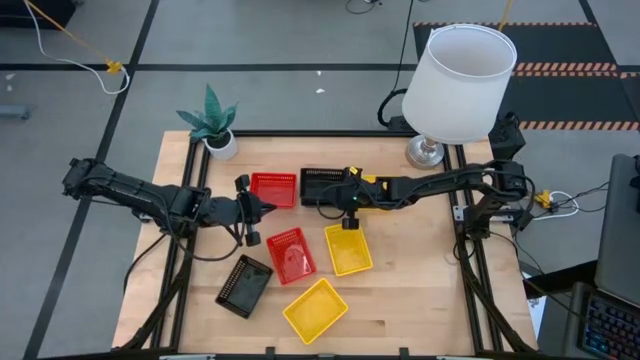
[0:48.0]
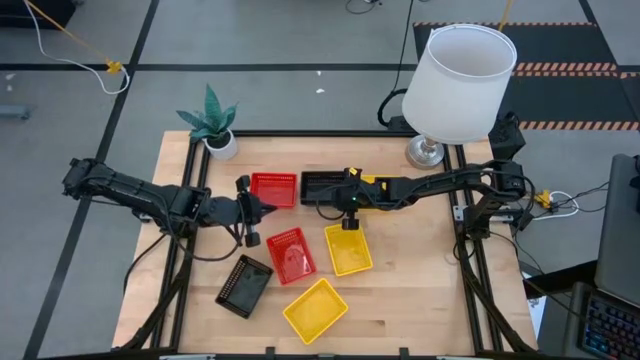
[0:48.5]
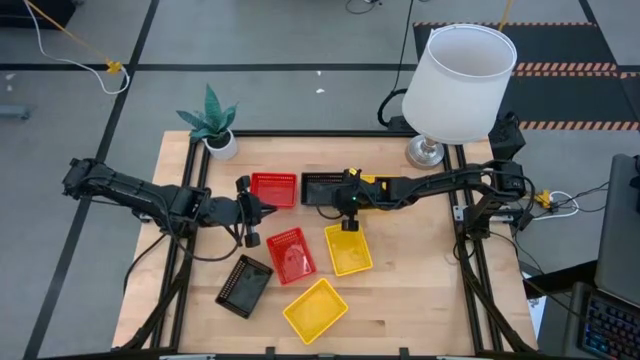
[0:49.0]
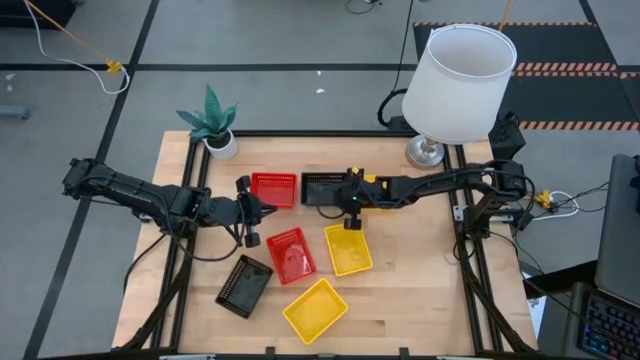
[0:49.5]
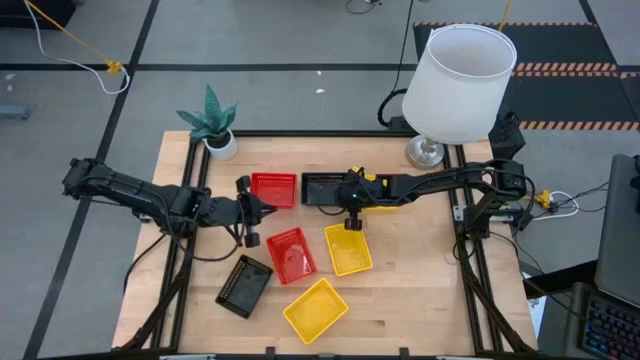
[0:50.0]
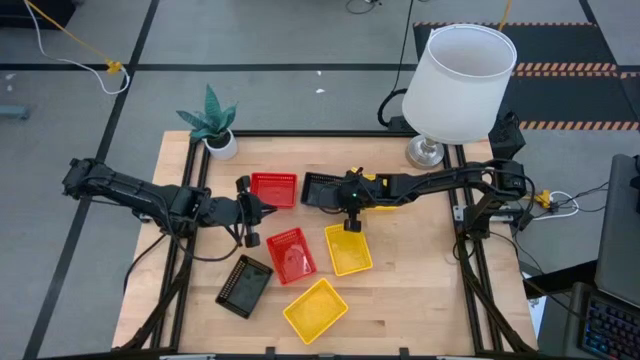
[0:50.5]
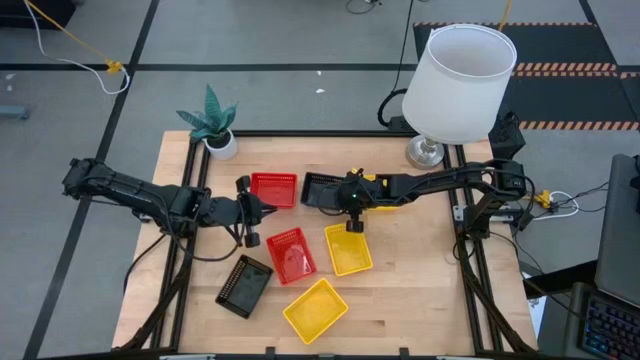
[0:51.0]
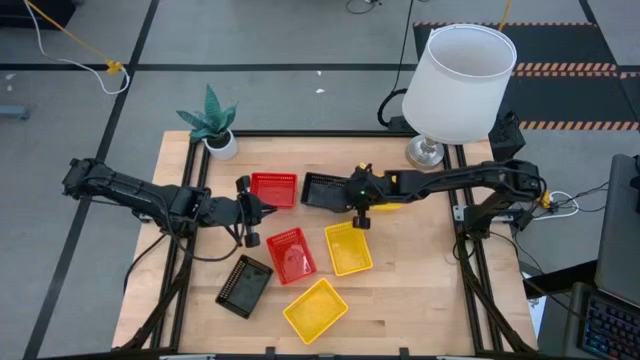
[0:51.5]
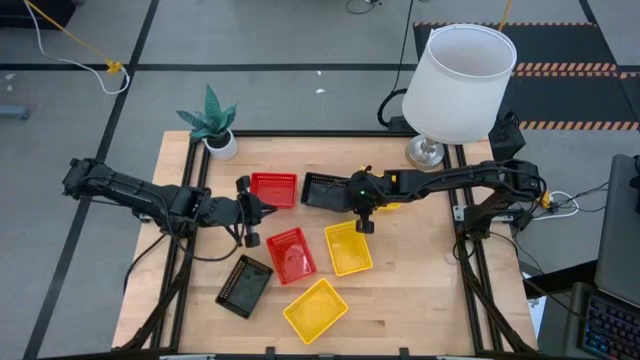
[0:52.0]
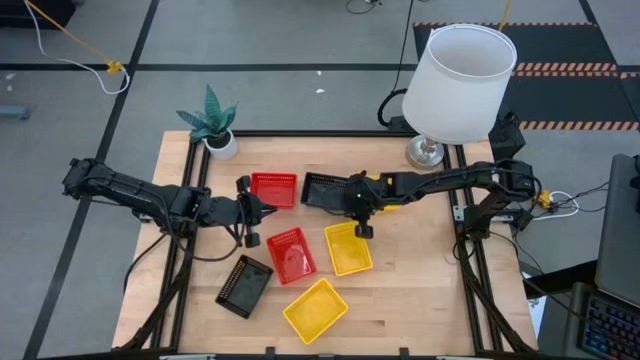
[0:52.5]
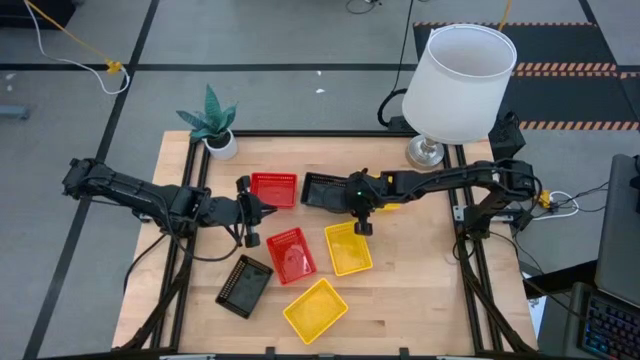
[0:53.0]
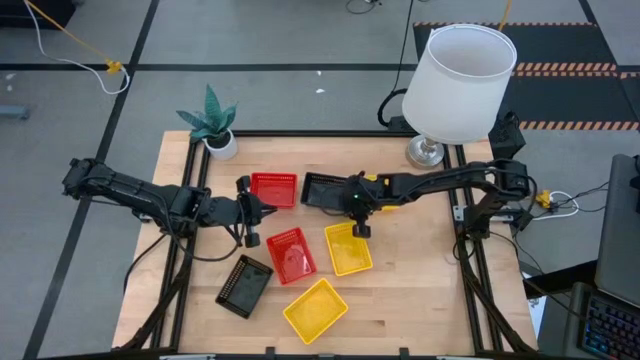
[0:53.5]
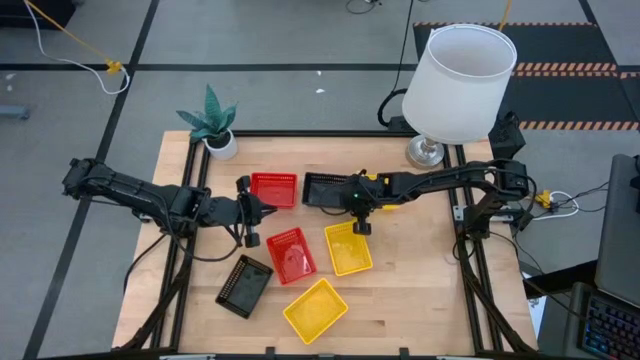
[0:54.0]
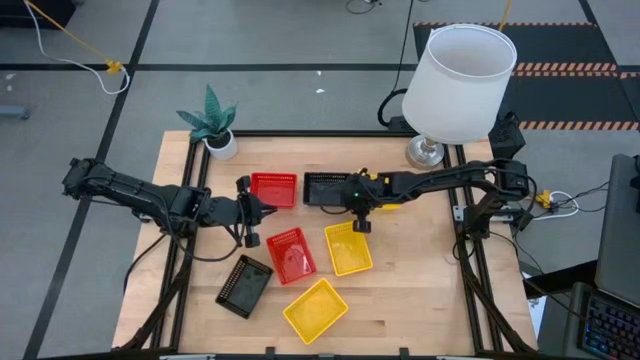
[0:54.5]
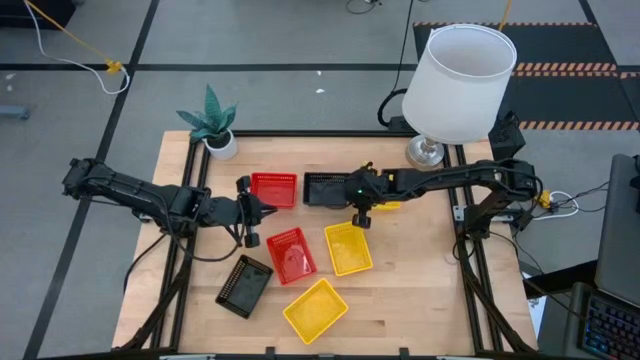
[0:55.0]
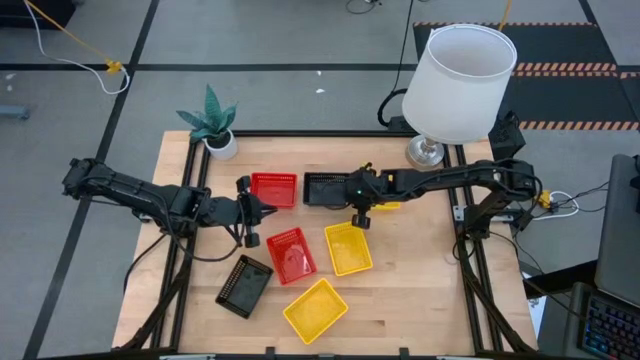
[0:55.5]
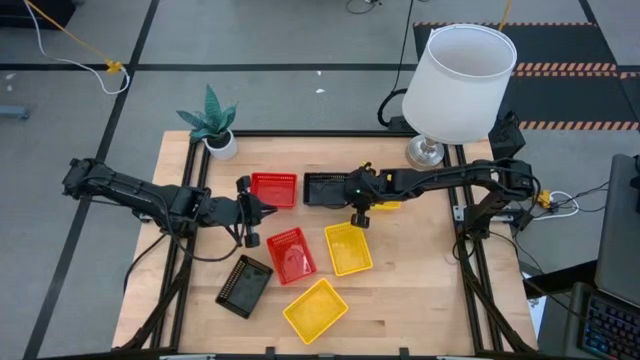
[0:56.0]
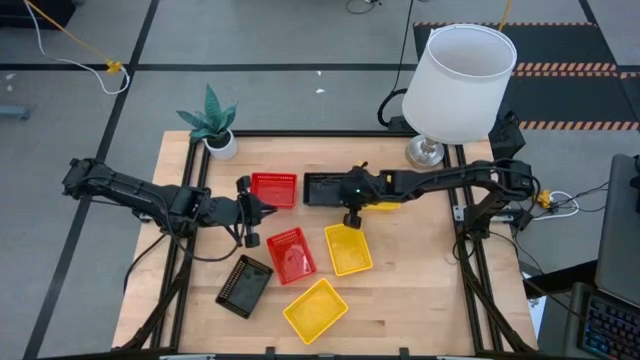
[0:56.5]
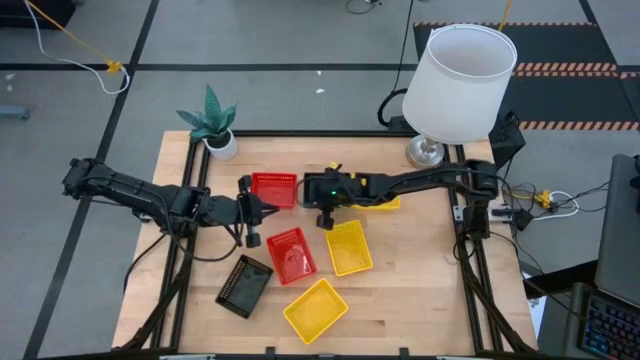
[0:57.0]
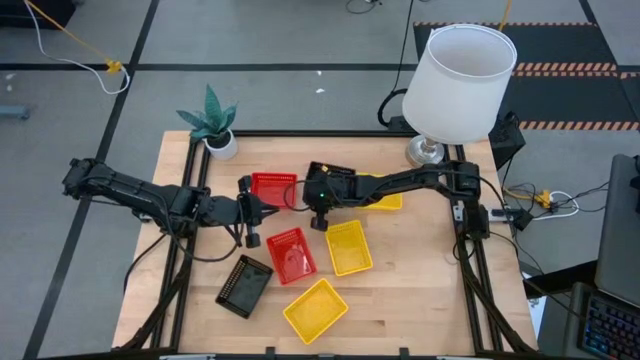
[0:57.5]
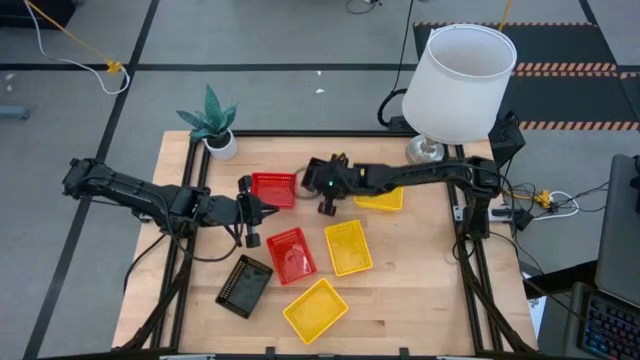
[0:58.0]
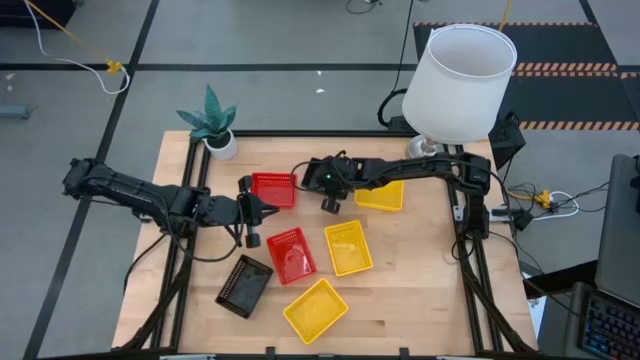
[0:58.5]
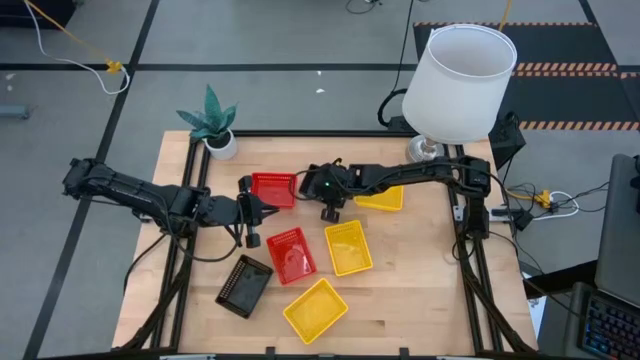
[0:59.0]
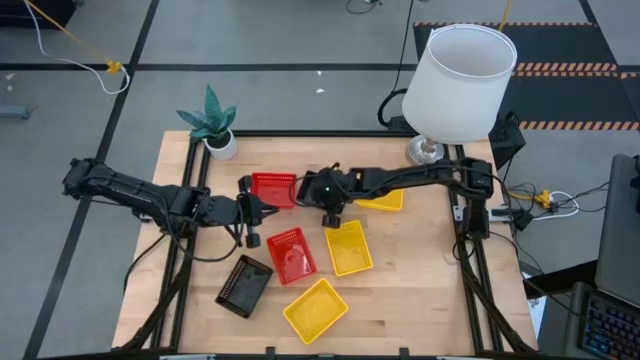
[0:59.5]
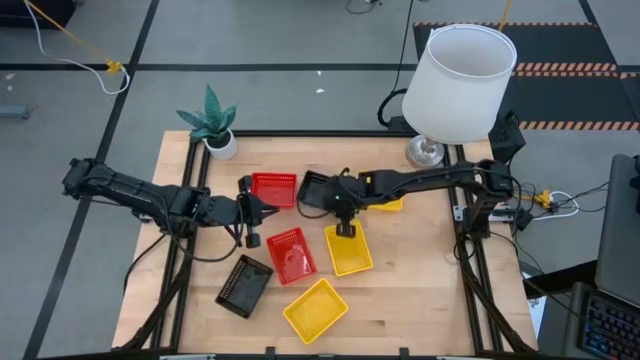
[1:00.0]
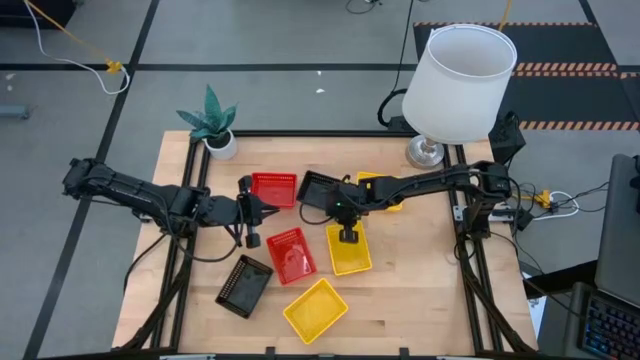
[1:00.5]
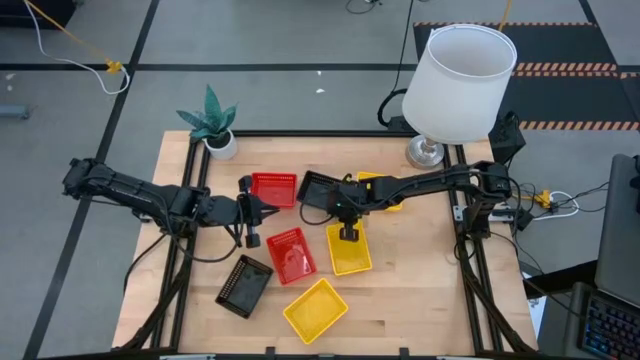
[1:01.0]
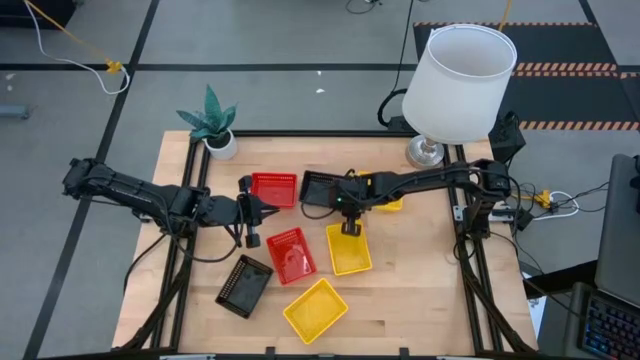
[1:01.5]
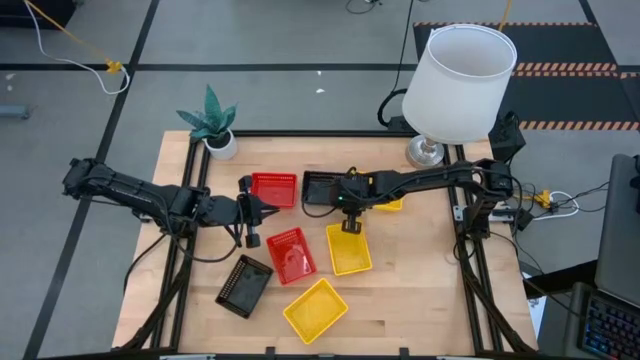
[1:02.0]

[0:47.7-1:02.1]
Stack the bottom right black bin on top of the top black bin

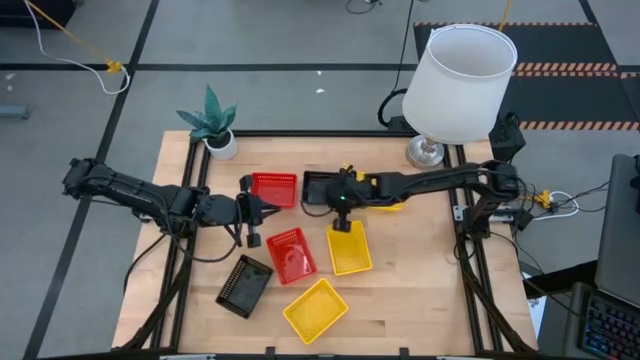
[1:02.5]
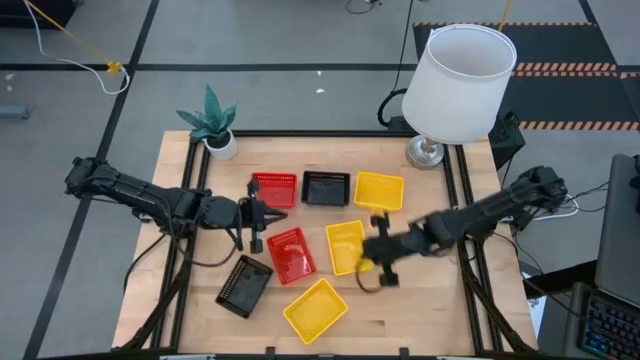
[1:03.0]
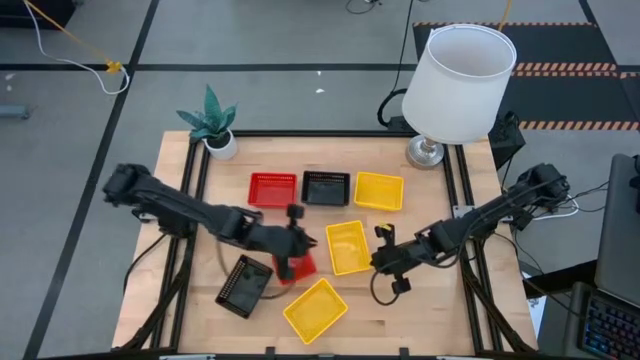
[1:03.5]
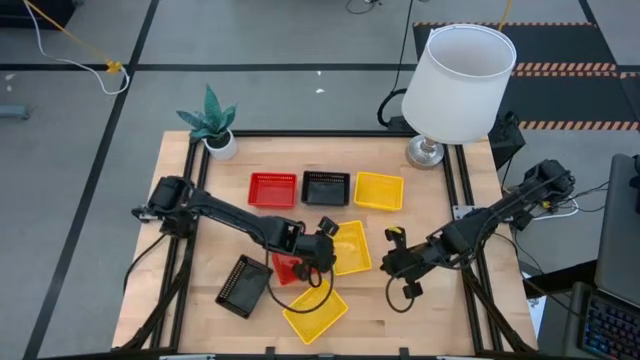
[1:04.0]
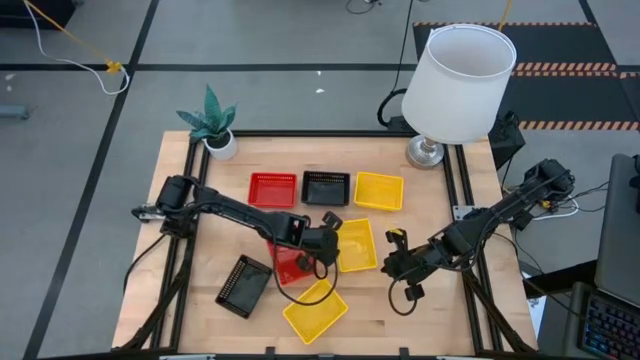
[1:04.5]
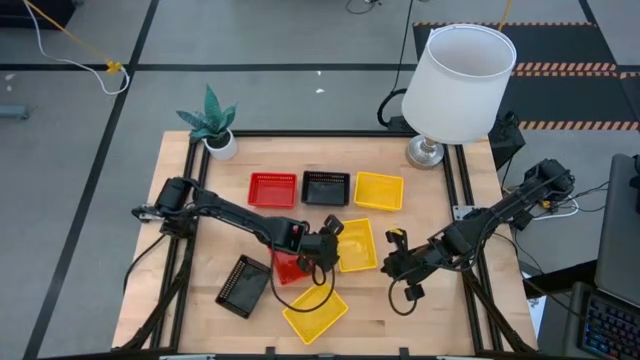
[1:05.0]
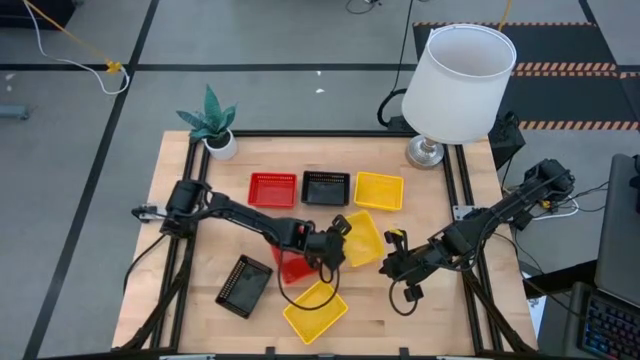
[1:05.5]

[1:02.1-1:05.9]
Stack the middle yellow bin on top of the top yellow bin
